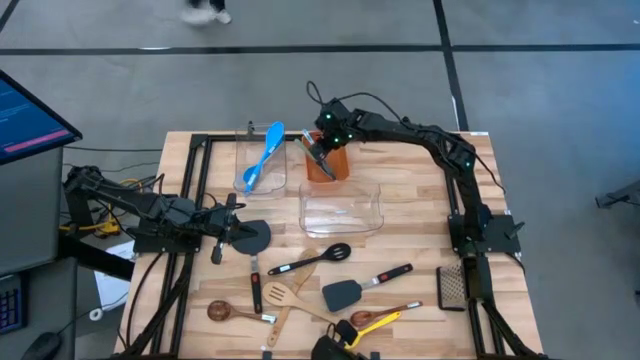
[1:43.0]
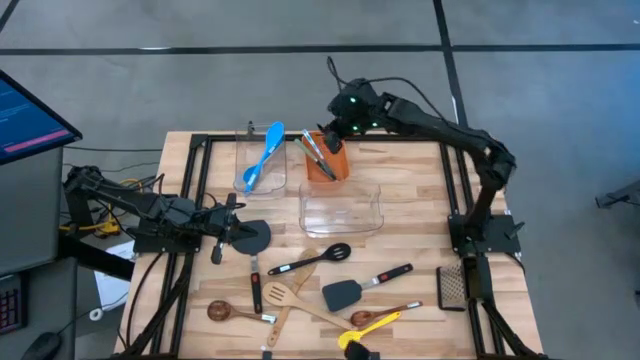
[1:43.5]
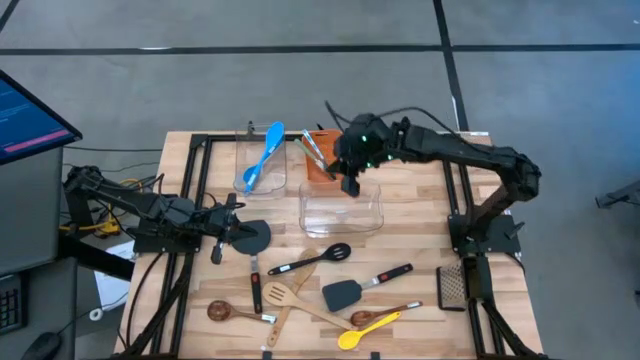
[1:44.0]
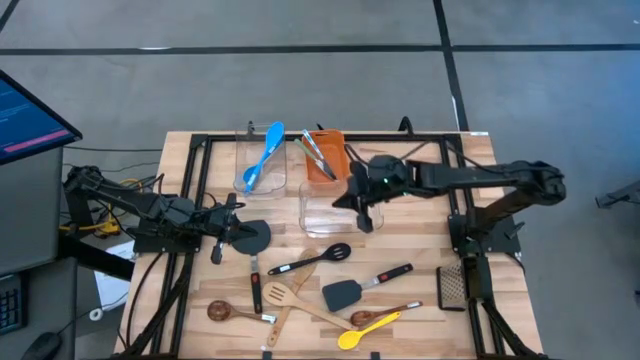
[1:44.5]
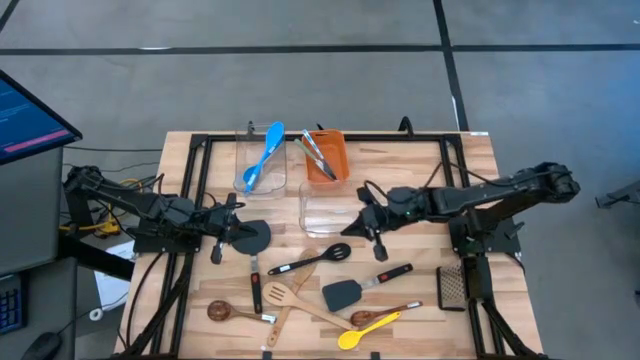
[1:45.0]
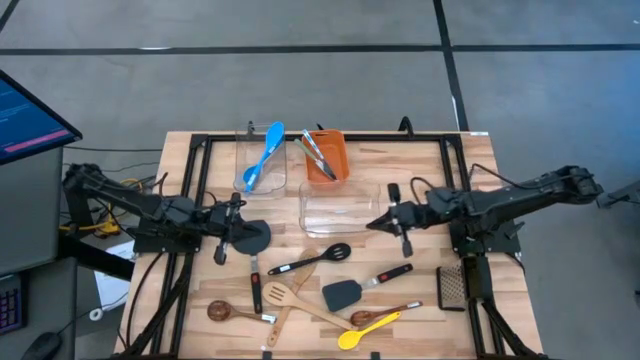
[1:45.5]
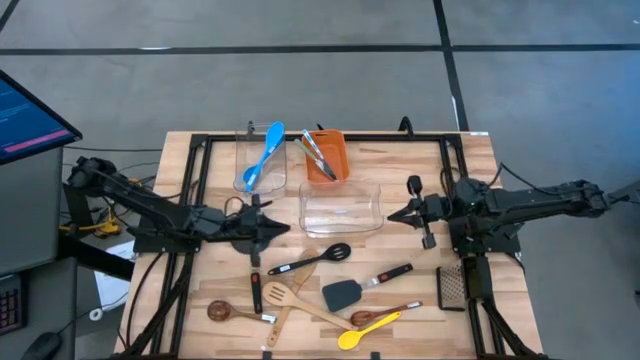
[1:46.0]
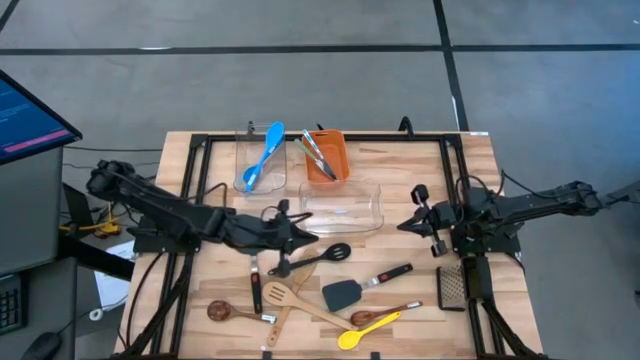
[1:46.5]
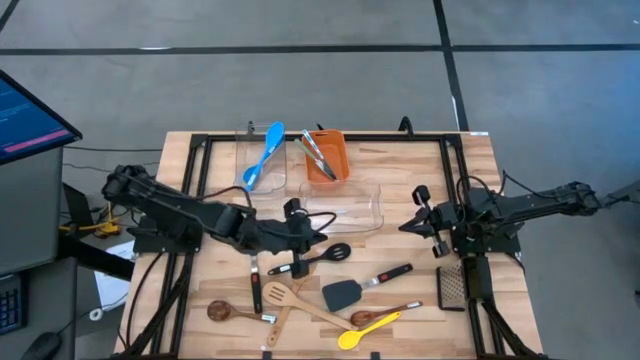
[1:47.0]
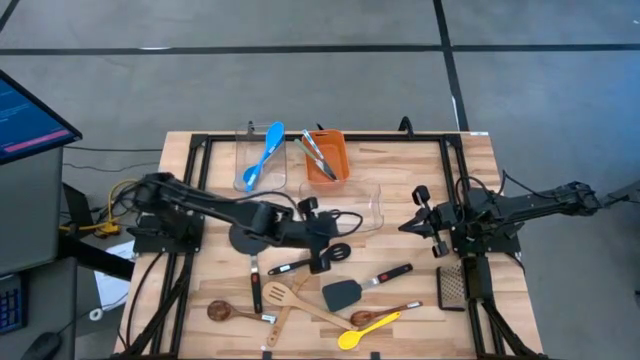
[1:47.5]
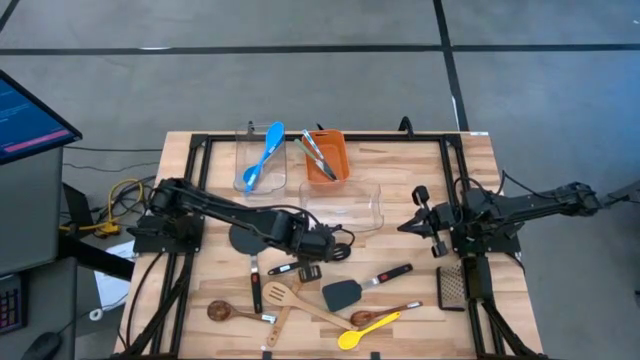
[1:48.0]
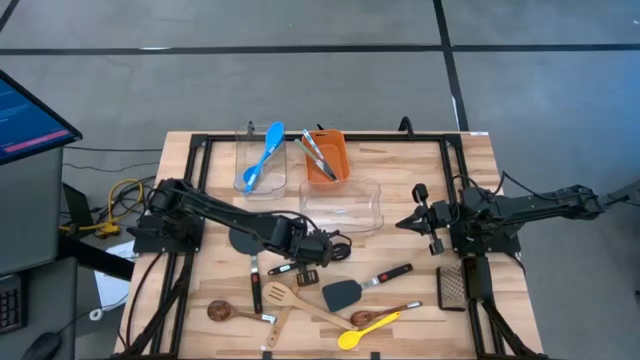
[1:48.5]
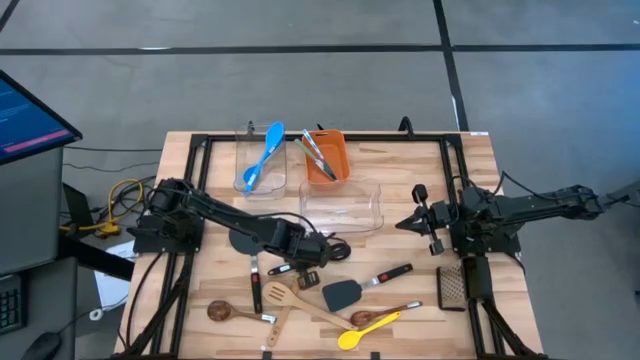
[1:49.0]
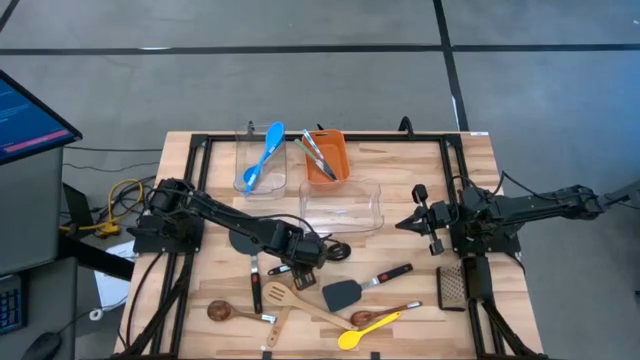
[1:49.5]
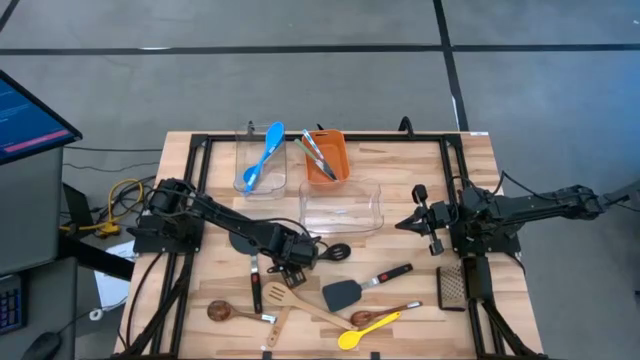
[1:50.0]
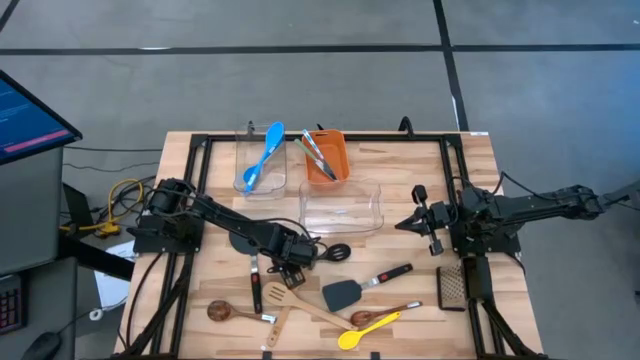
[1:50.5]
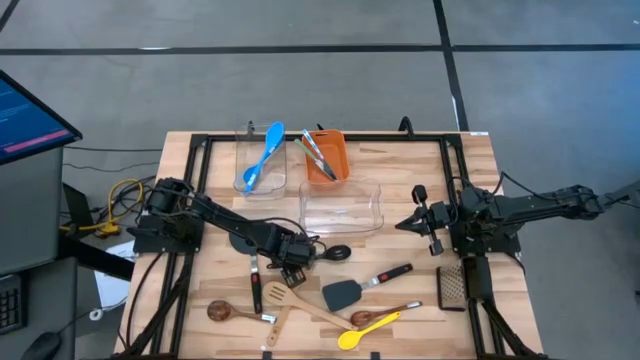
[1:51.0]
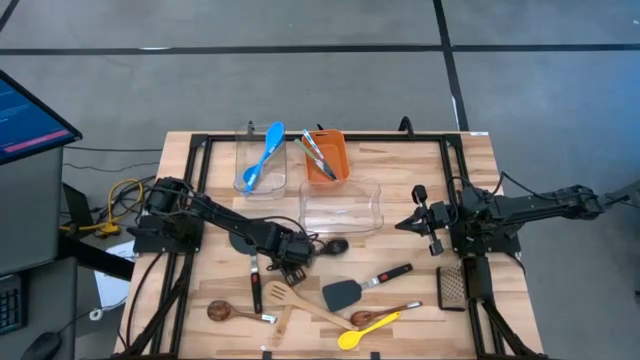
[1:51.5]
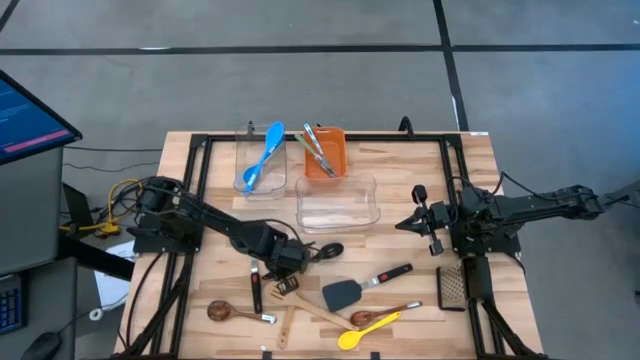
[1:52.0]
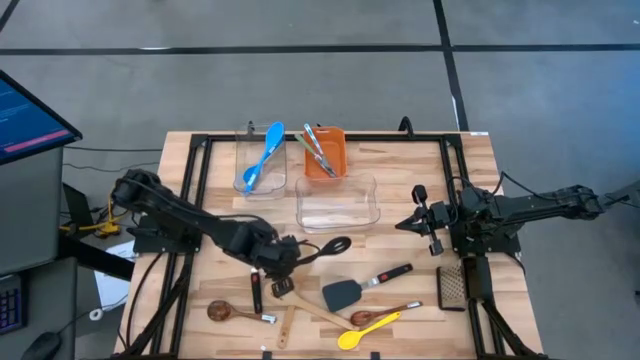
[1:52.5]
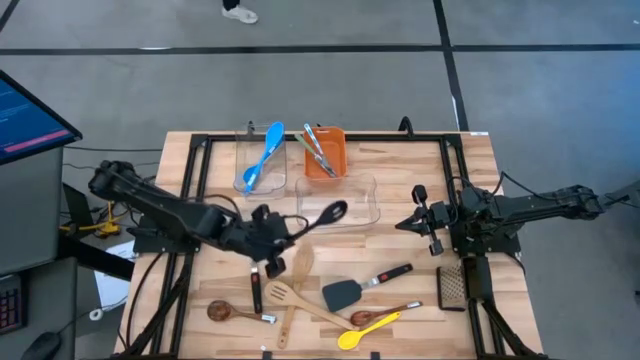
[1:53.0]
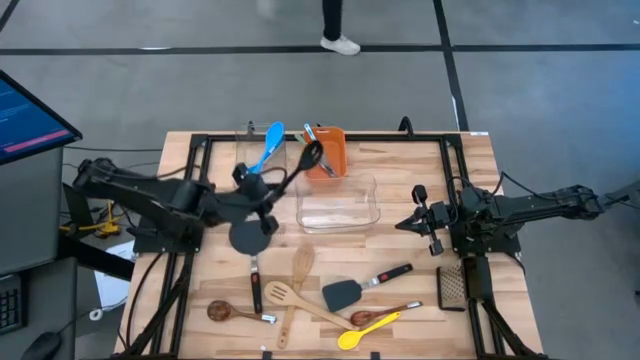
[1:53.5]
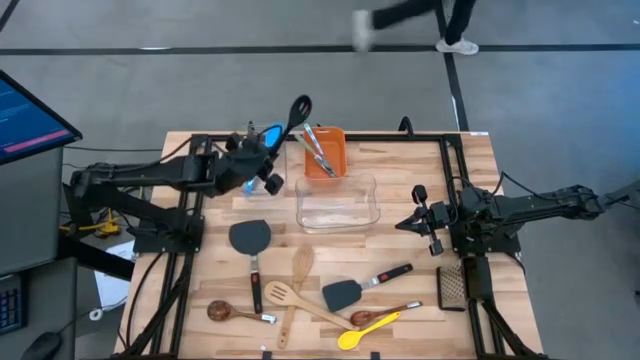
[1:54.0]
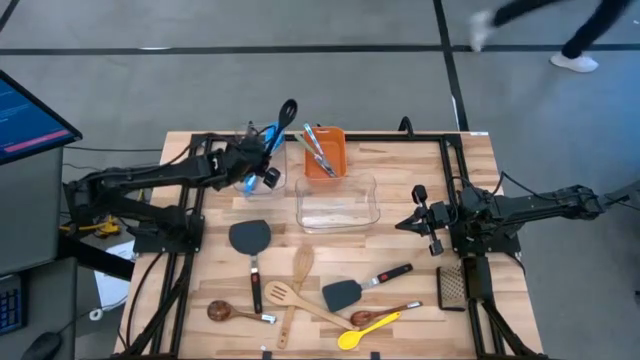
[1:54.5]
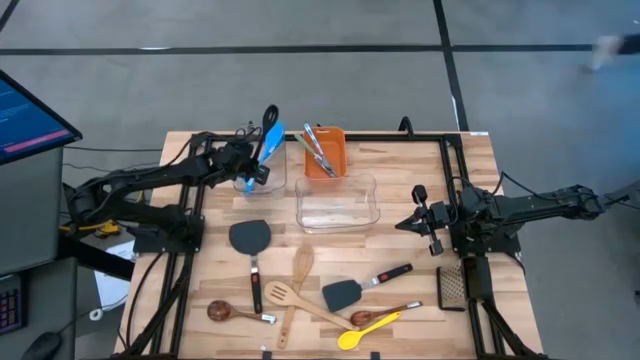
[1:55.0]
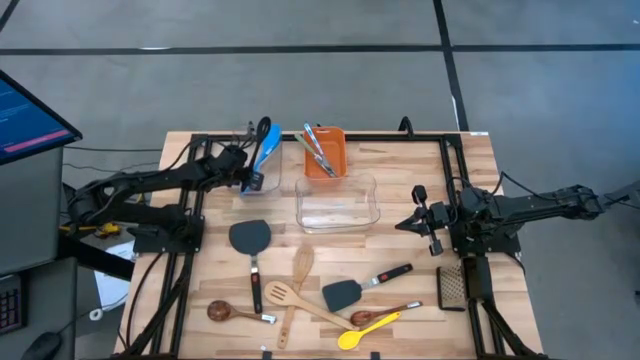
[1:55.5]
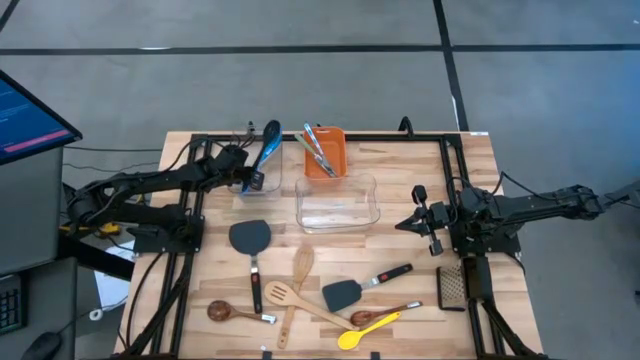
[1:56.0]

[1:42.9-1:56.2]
Task: Pick & Place Kitchen Items
Put the black slotted spatula into the top transparent bin

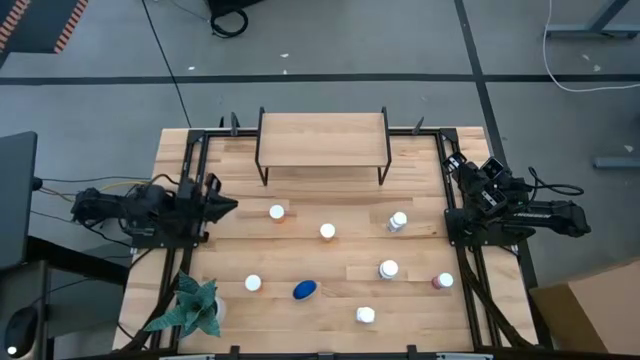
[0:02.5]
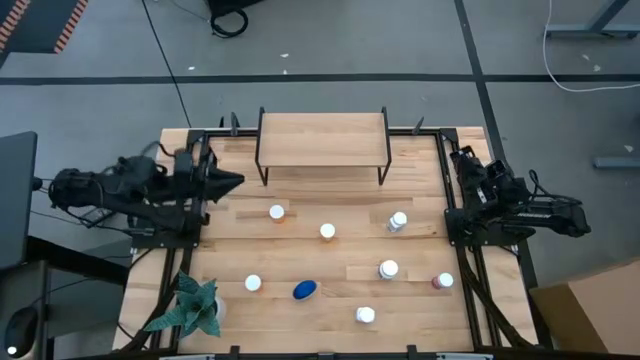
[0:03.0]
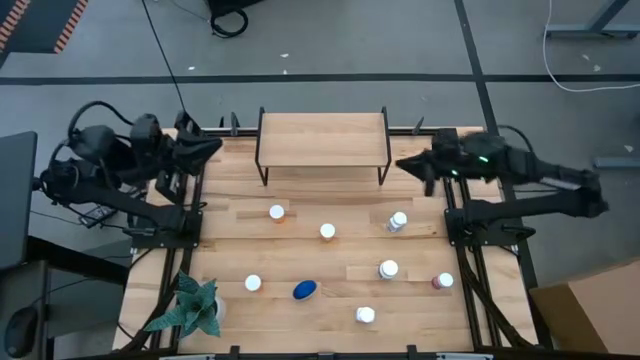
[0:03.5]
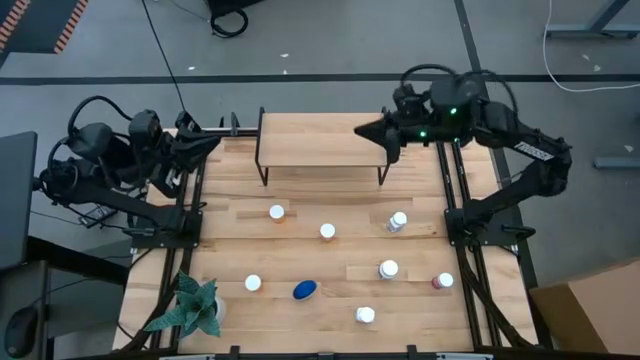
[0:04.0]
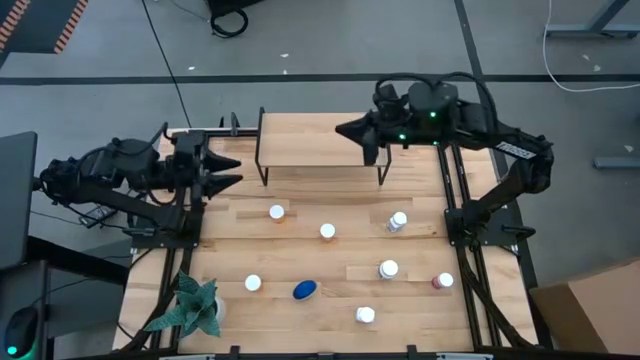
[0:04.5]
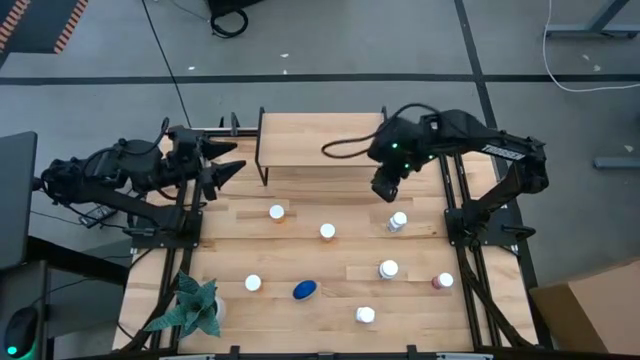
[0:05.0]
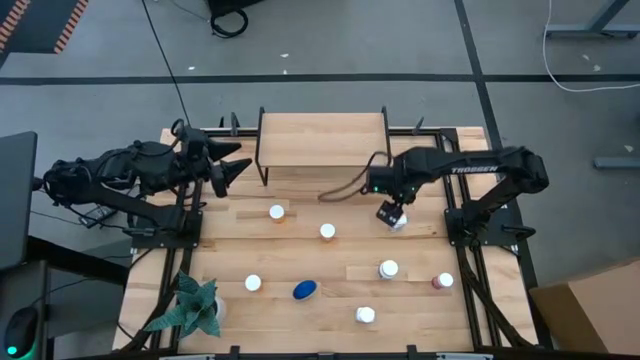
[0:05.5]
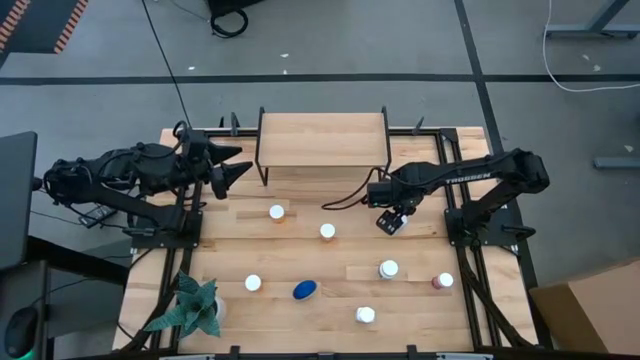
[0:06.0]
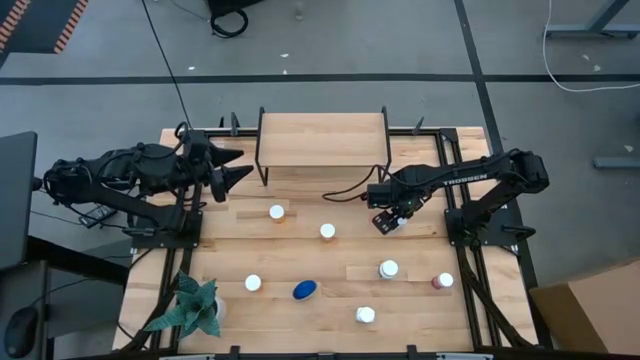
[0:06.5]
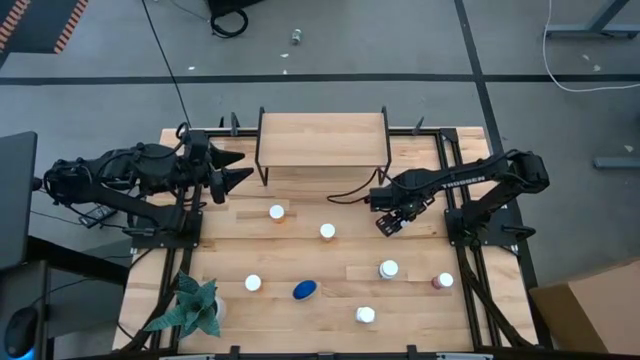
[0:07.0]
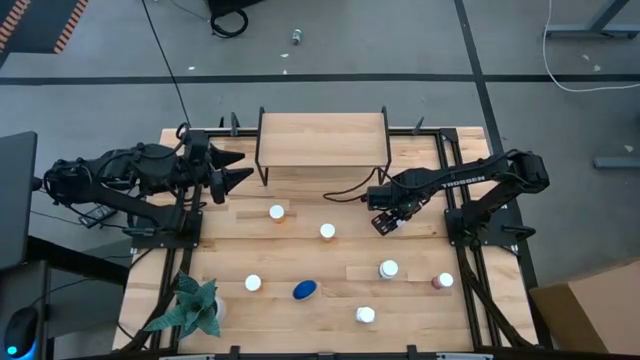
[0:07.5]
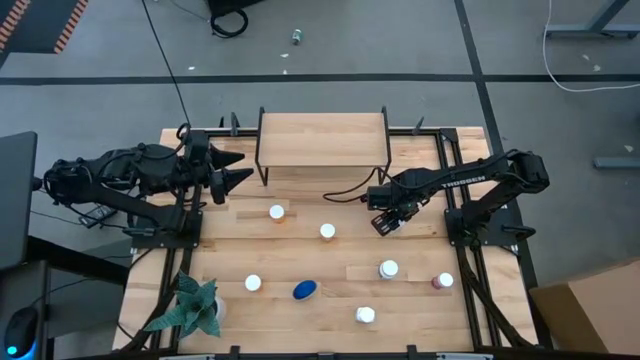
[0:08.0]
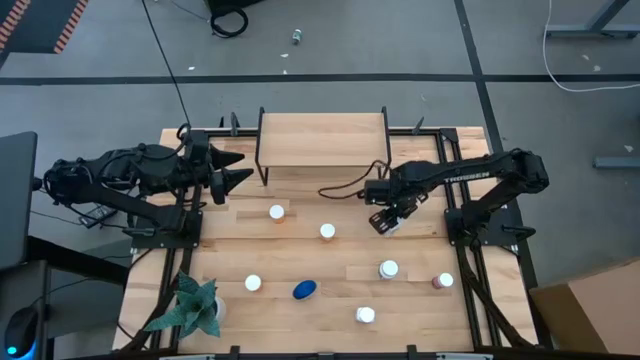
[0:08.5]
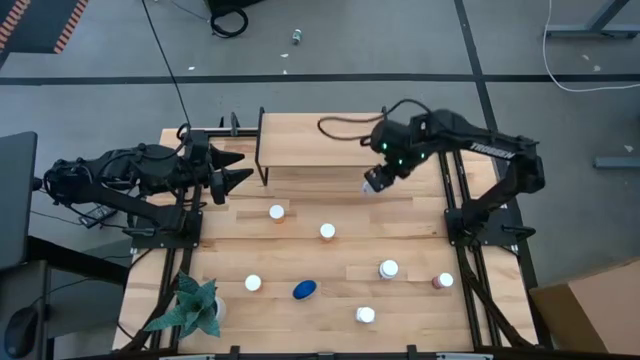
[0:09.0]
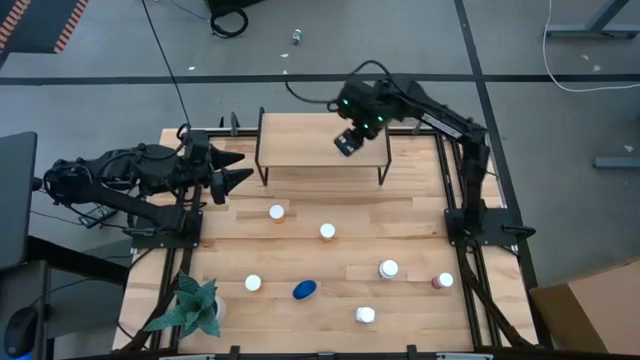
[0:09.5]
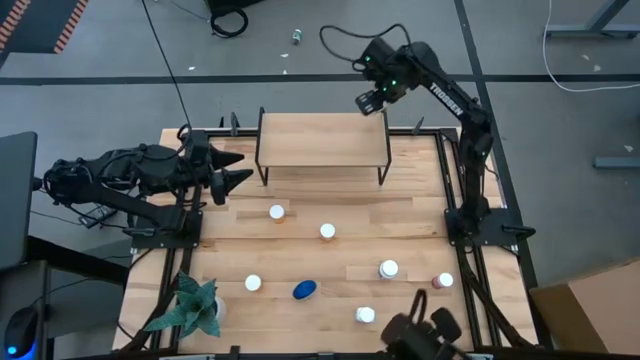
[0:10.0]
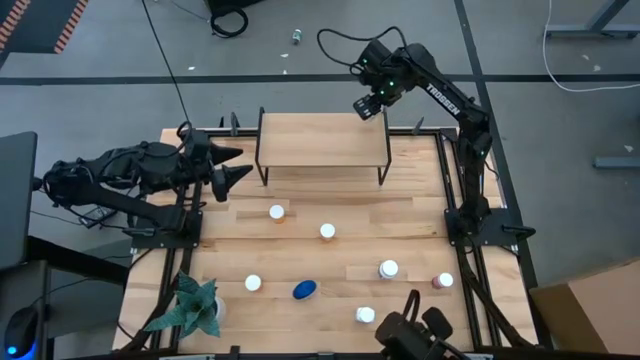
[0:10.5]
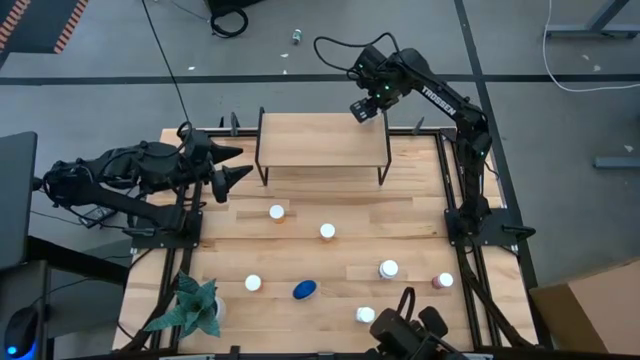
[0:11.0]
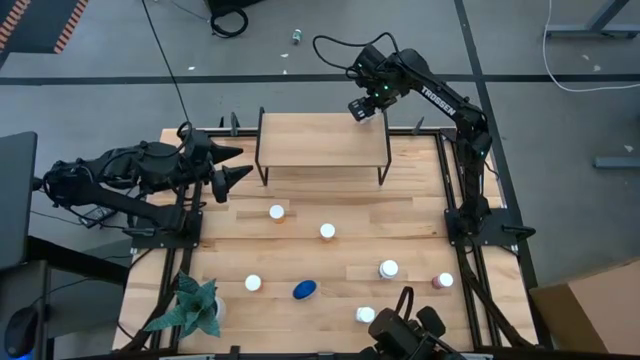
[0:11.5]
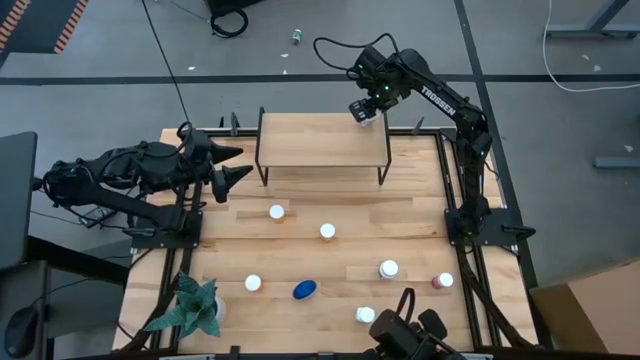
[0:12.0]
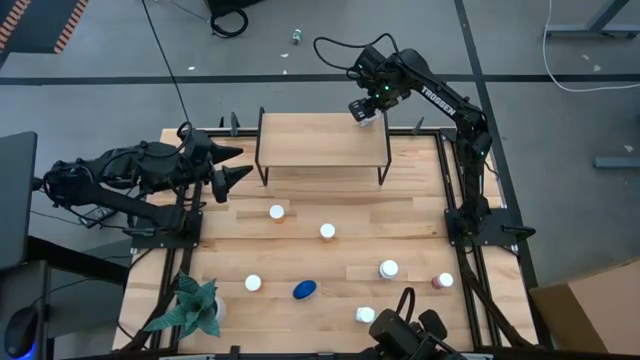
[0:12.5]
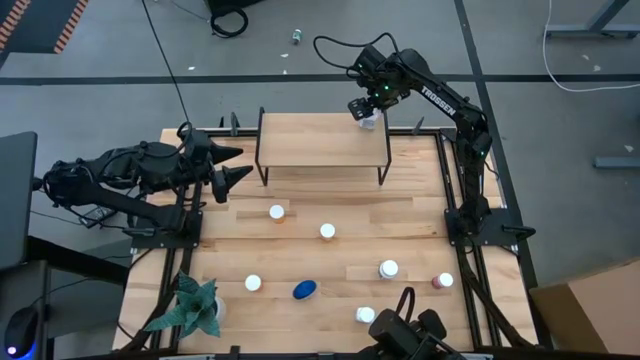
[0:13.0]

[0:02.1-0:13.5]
Task: Pick and place medicine bottles onto shelf by color
Put the top white and blue medicine bottle on the shelf
